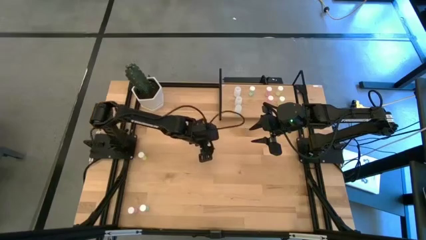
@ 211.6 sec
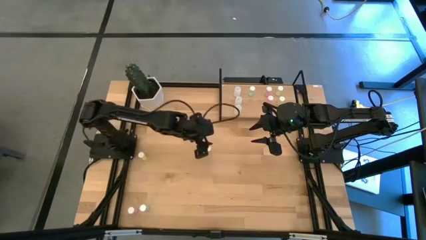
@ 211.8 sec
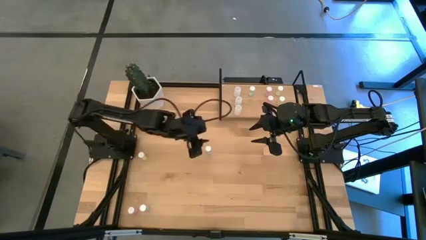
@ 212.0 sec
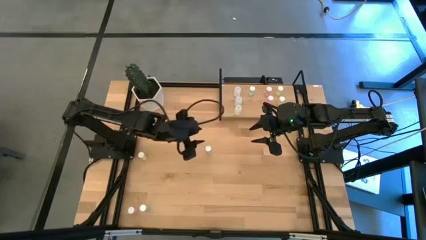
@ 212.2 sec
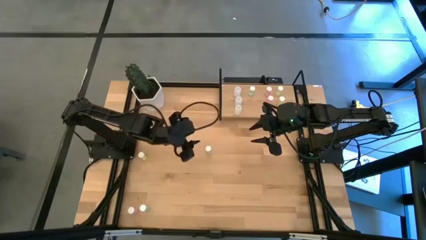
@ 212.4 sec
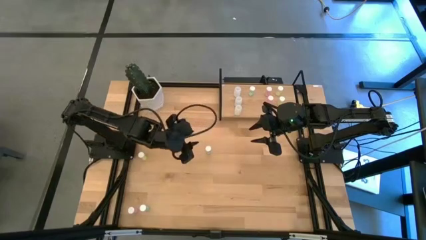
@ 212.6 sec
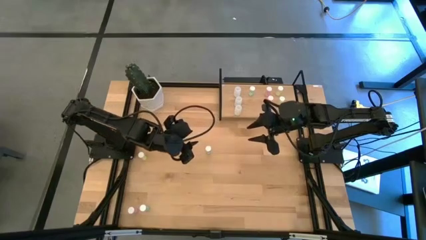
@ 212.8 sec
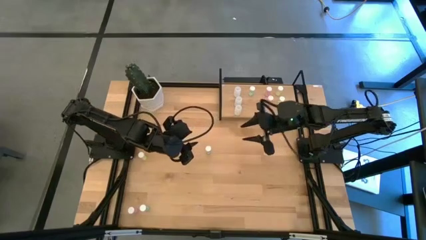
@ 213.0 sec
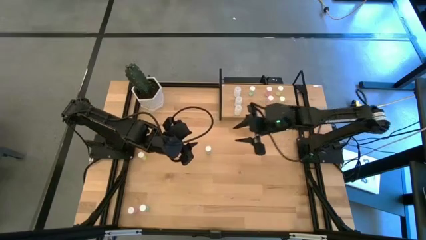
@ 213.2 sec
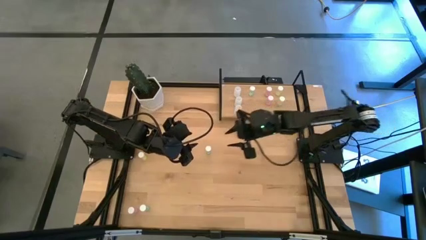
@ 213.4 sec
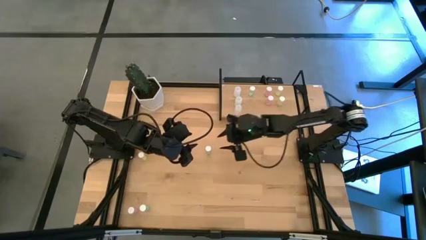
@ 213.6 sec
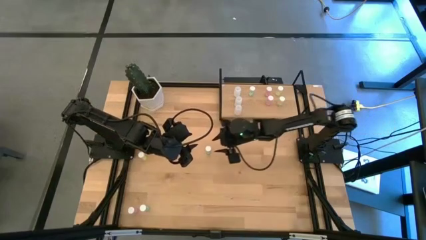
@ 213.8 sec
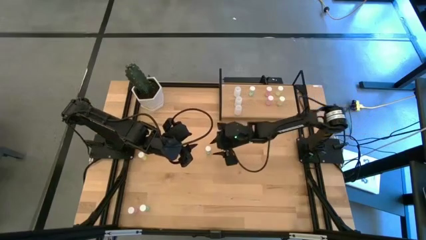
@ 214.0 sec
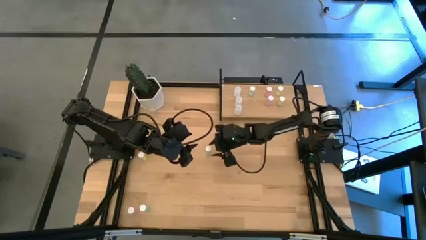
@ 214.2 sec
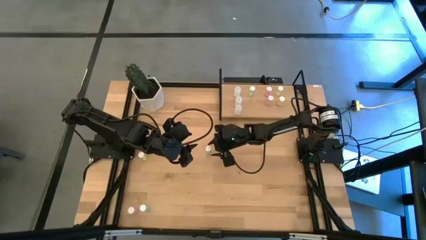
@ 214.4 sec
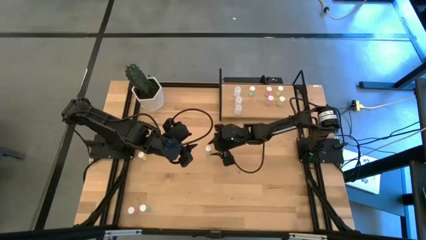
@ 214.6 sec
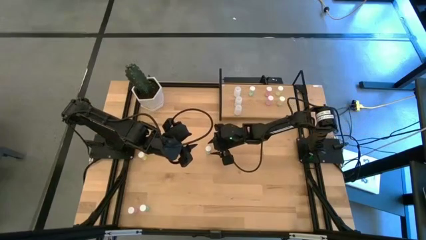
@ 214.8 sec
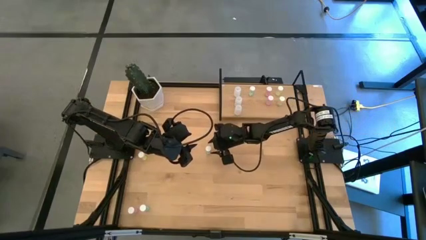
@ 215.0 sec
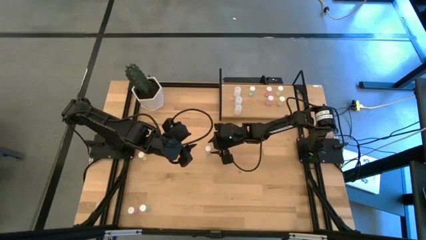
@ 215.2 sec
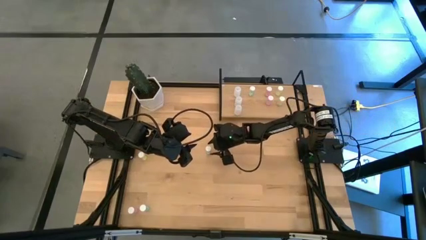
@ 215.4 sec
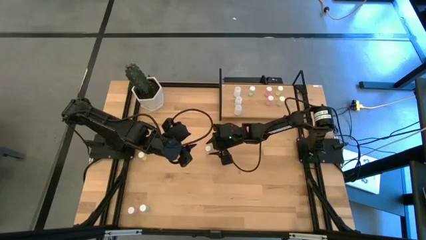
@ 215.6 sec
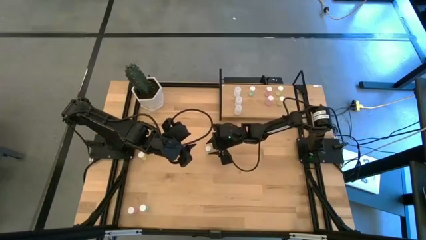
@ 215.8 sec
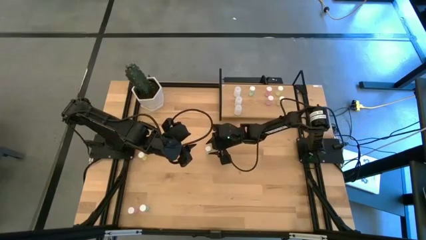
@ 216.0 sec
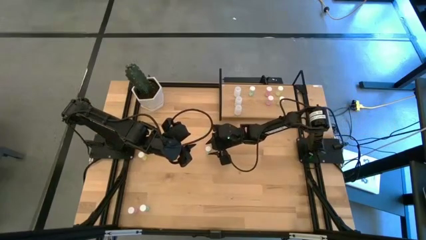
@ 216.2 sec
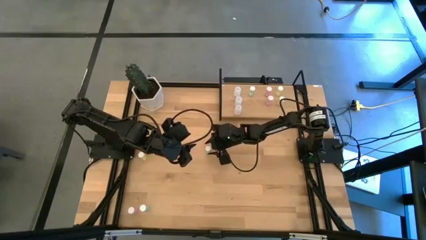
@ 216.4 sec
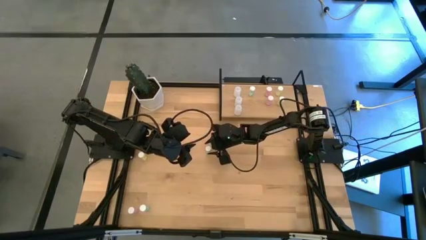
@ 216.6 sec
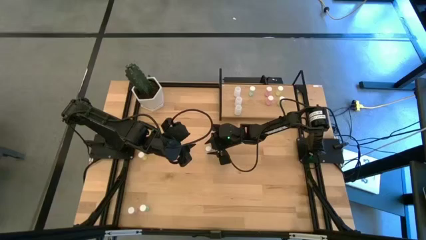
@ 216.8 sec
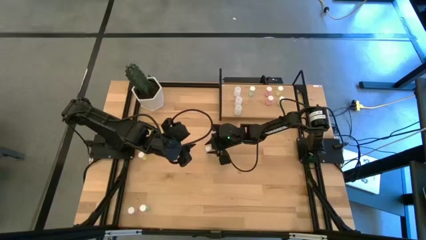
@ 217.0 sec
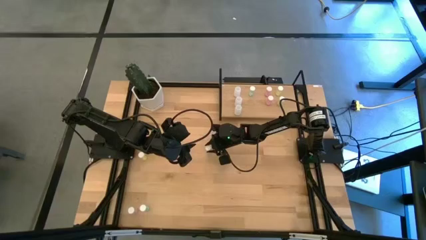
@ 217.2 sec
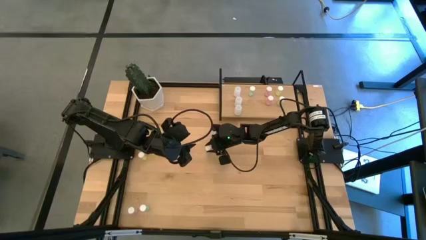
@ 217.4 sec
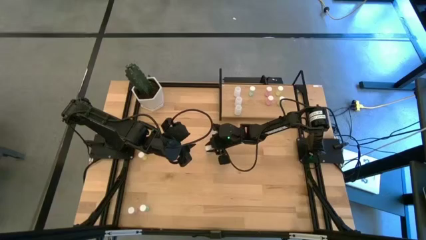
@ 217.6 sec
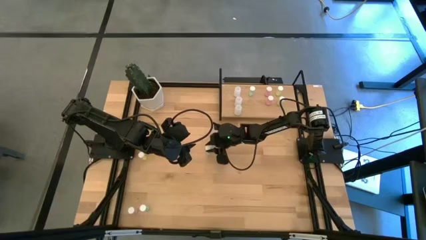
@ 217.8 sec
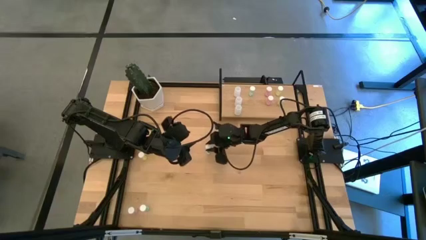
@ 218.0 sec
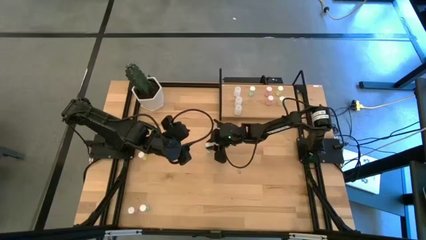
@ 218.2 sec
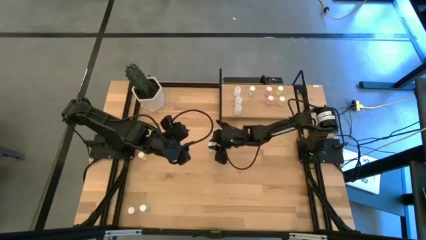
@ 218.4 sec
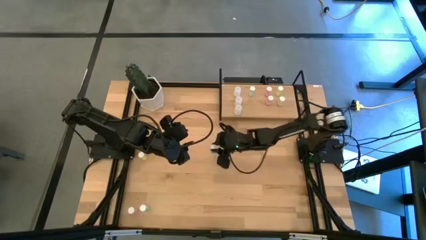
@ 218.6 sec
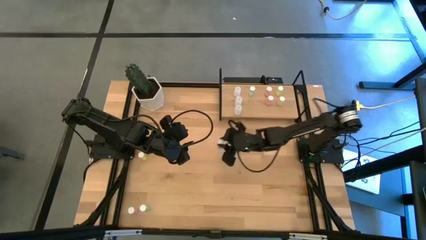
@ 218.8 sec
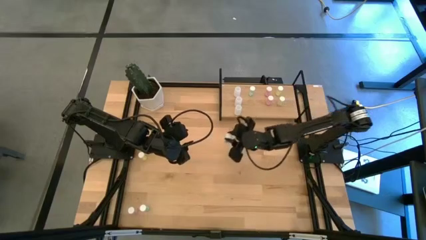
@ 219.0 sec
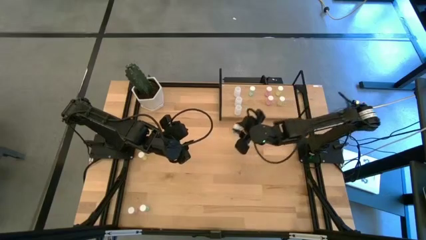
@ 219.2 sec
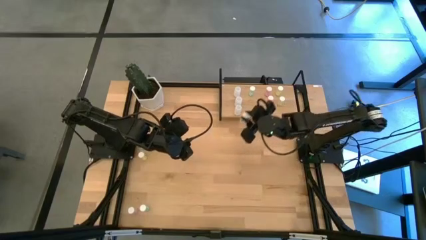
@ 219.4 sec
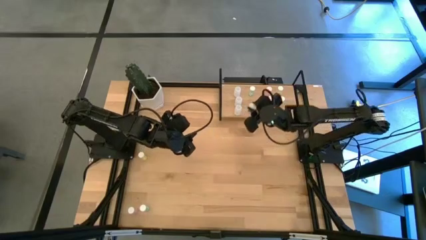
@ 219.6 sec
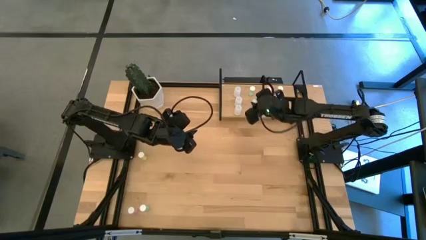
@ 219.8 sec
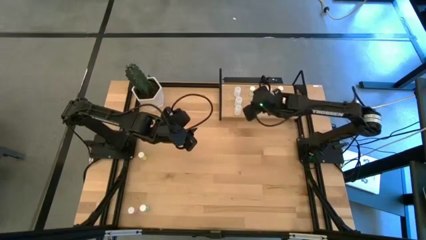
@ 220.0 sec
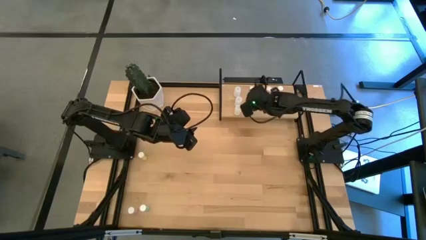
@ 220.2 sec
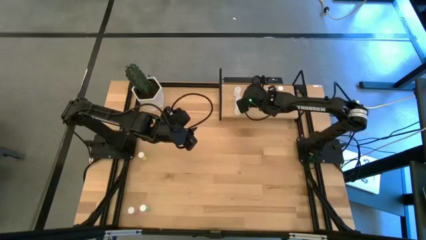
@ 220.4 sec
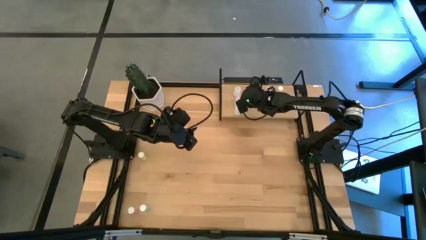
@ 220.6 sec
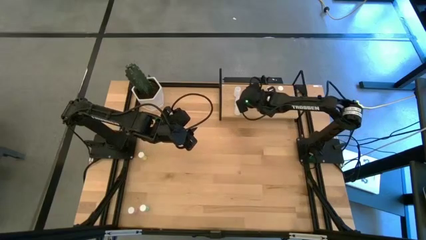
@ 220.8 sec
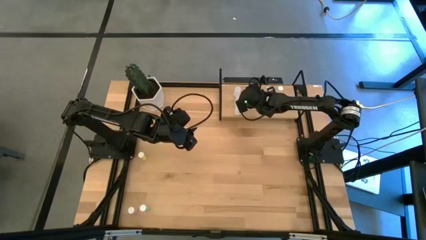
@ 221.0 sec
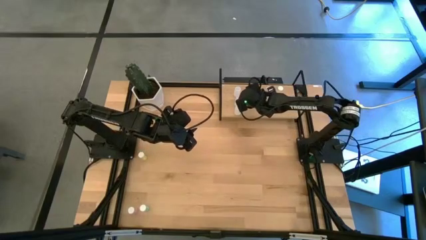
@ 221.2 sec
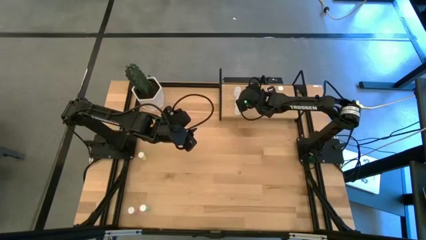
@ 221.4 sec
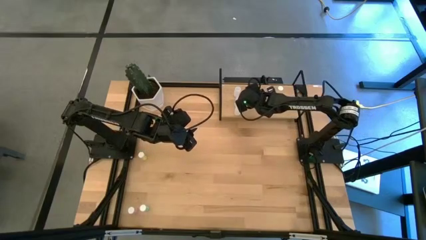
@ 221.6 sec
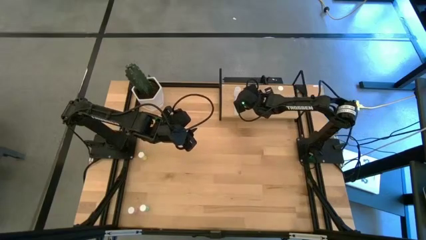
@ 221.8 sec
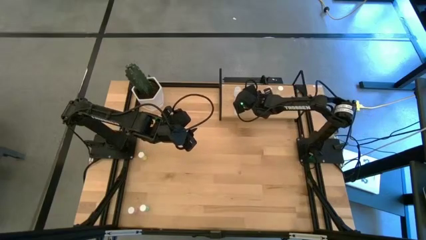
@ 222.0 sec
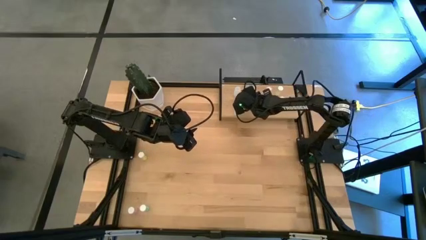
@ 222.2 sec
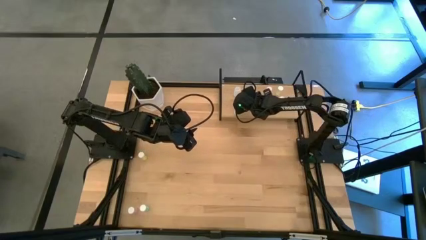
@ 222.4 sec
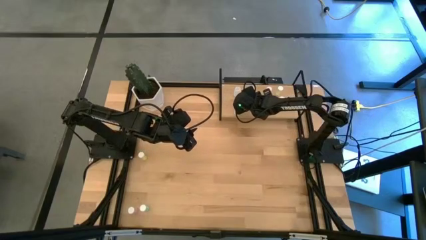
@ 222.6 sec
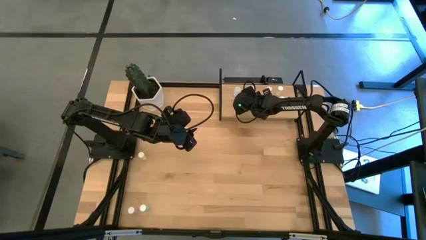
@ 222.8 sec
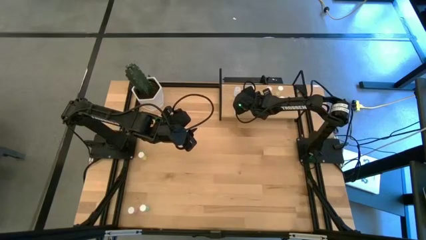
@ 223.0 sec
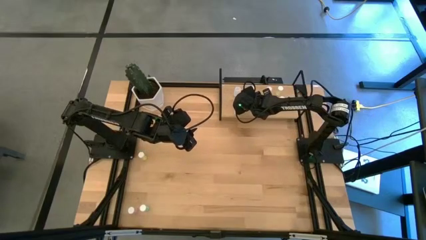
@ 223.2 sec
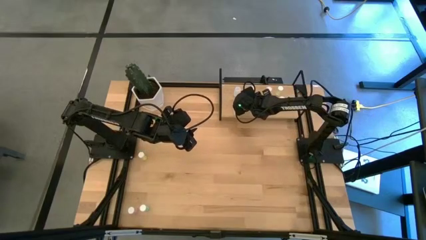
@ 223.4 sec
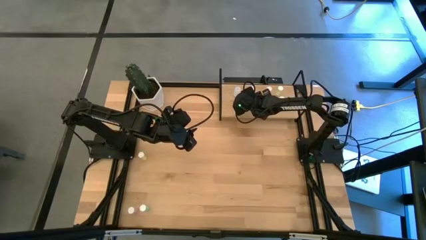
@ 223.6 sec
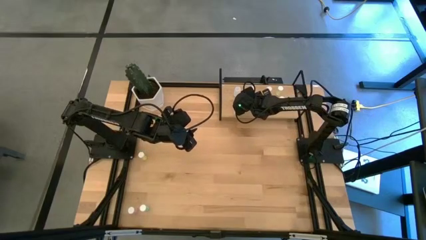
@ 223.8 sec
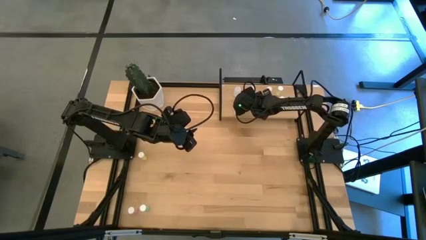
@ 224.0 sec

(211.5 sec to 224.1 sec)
Task: Pick and place medicine bottles onto shelf by color
Put the top green pill bottle on the shelf aligned with the other green pill bottle

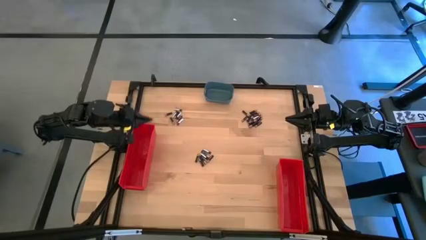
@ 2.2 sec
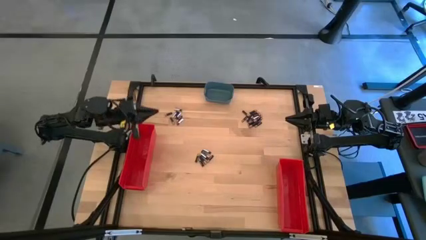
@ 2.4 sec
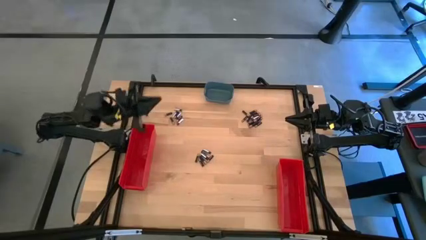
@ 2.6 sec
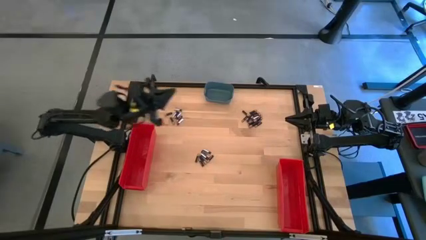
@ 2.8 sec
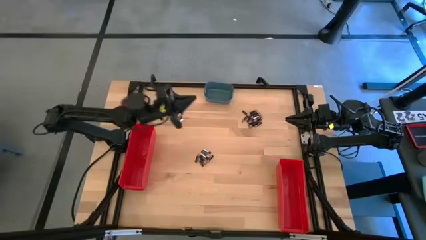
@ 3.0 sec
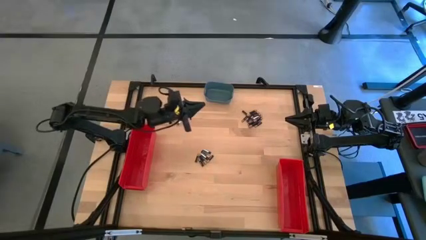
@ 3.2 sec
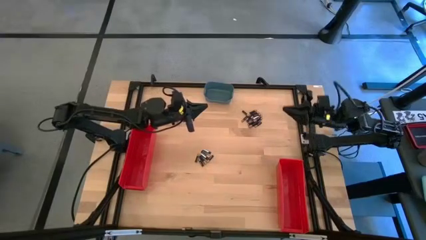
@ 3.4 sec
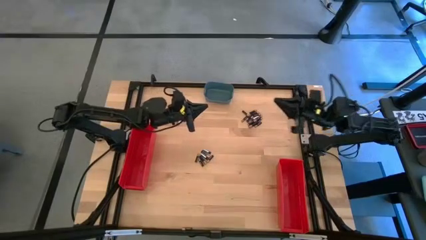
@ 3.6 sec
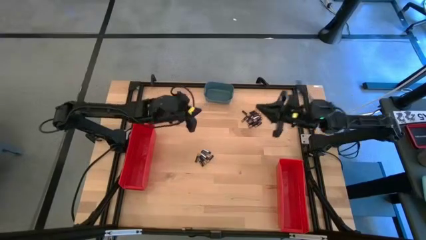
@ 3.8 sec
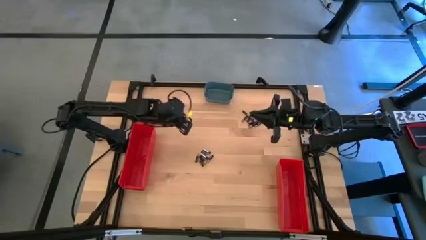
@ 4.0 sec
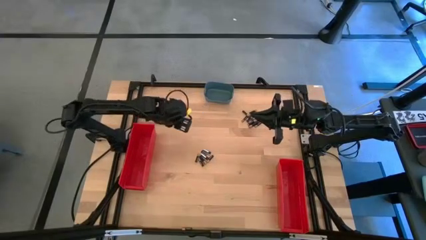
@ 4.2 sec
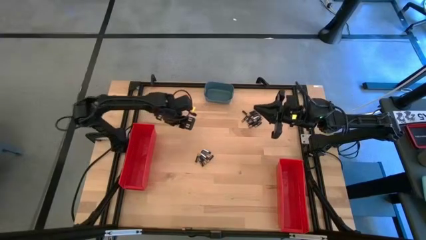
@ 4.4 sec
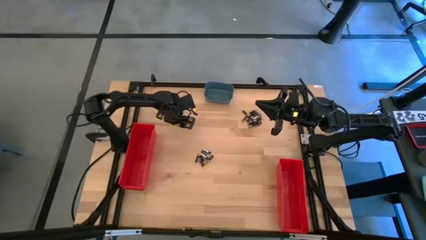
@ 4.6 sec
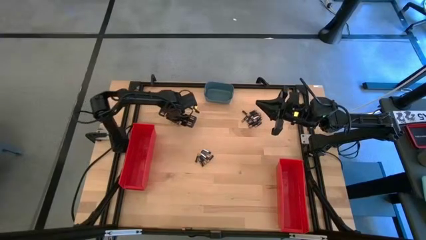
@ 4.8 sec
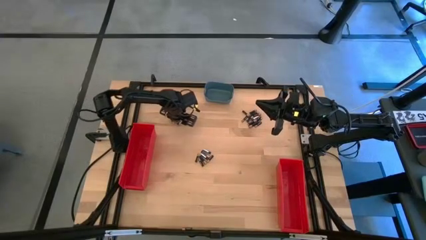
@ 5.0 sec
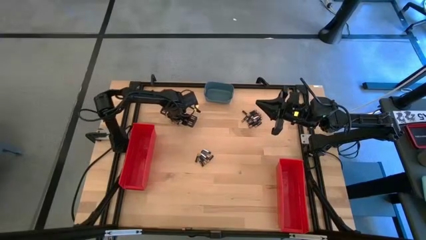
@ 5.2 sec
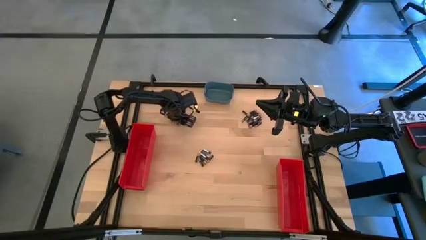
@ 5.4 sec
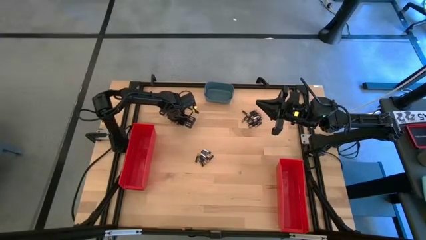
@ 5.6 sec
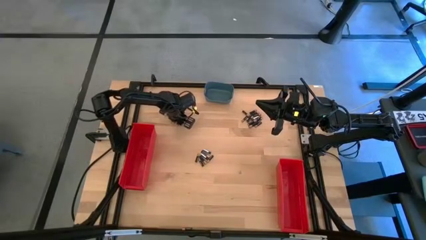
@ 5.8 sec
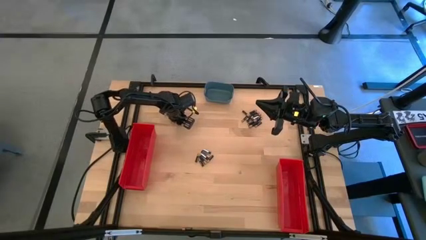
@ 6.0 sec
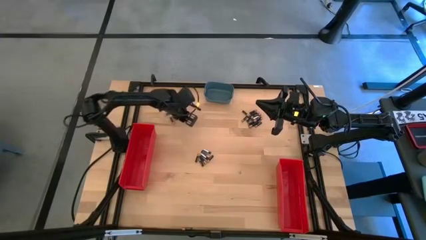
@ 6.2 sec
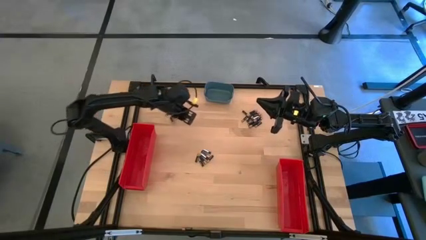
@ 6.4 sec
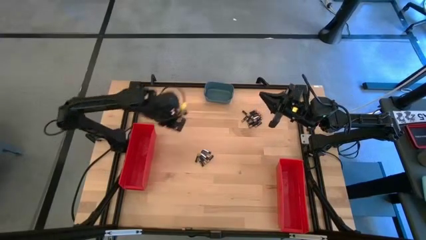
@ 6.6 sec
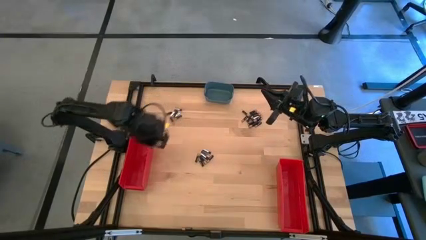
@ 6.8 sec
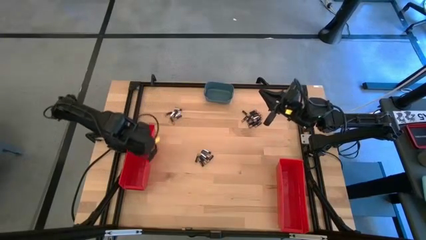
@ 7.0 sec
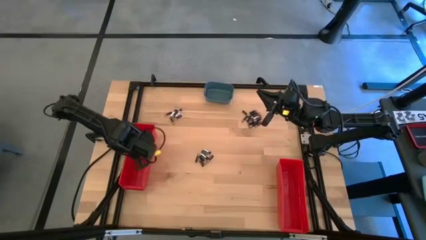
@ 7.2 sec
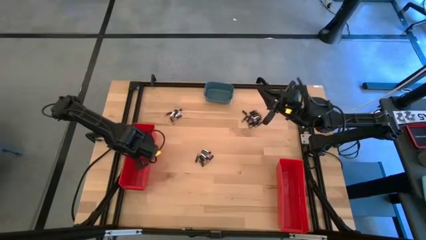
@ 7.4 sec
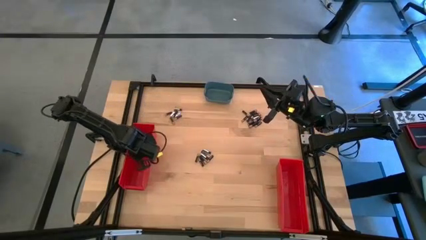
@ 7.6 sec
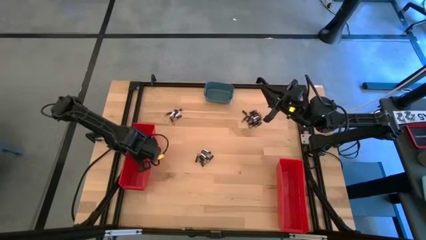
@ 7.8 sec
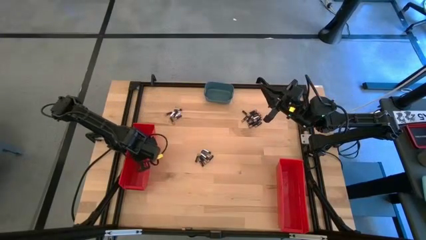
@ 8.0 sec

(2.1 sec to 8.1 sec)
Task: Sort batteries
Put the silver battery into the left red bin
